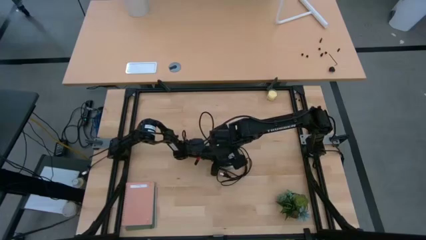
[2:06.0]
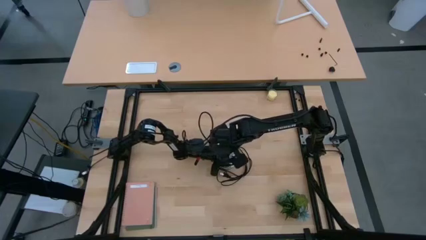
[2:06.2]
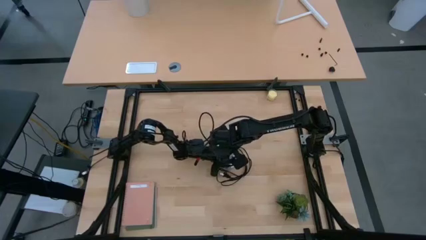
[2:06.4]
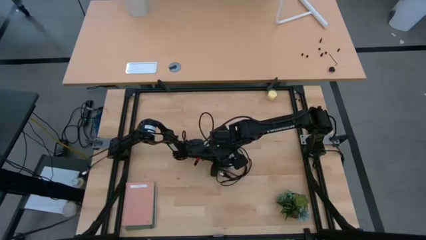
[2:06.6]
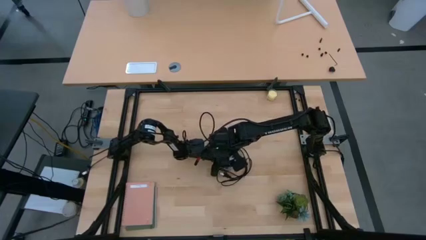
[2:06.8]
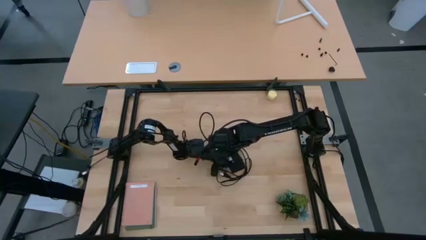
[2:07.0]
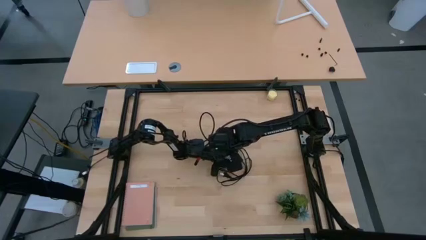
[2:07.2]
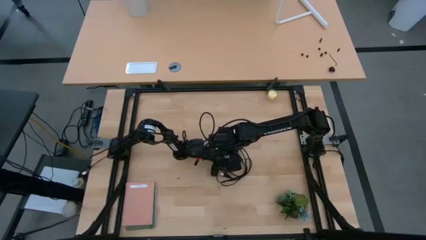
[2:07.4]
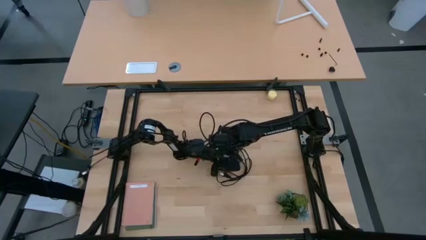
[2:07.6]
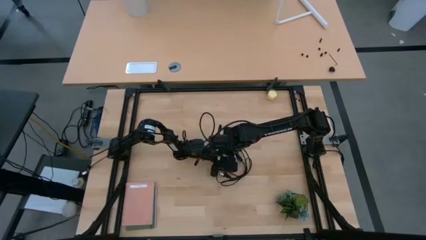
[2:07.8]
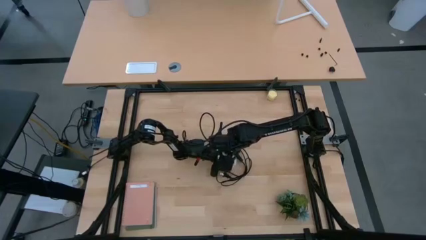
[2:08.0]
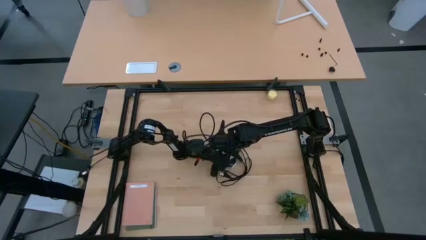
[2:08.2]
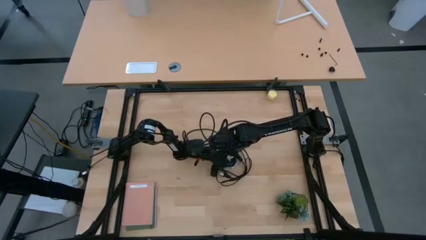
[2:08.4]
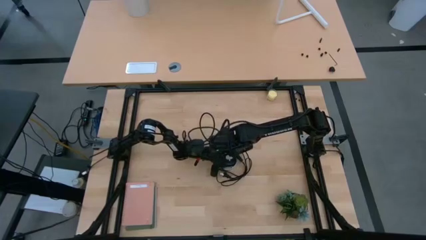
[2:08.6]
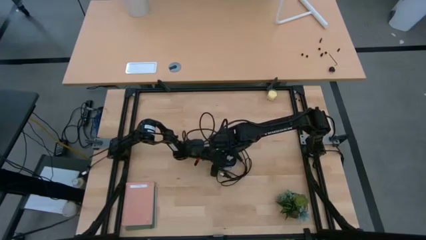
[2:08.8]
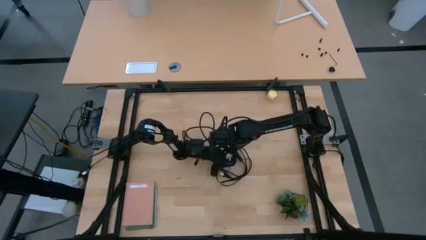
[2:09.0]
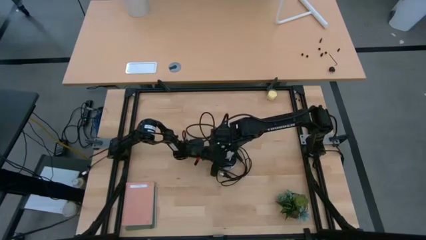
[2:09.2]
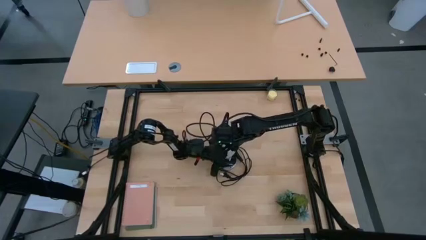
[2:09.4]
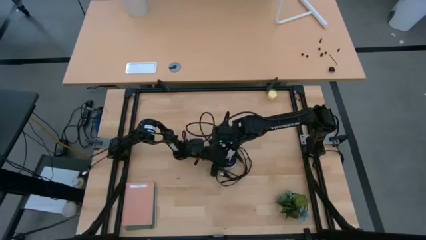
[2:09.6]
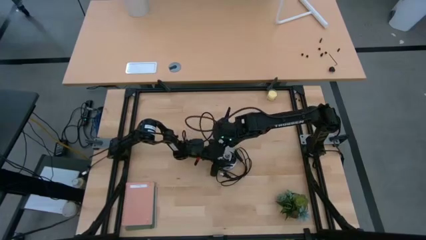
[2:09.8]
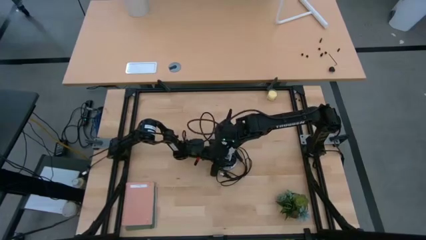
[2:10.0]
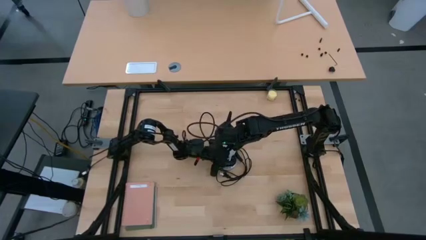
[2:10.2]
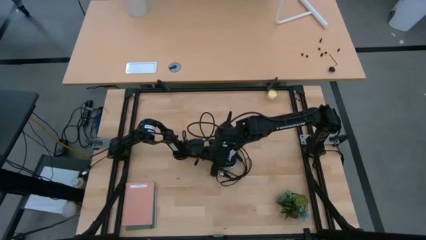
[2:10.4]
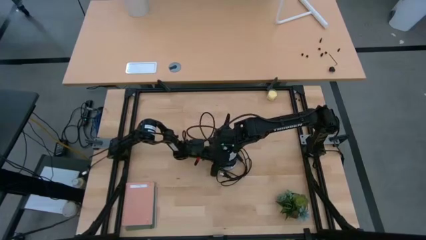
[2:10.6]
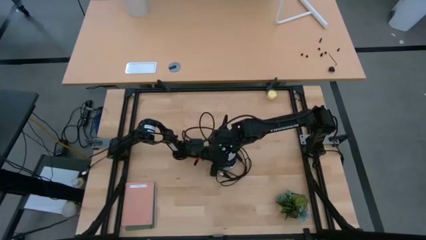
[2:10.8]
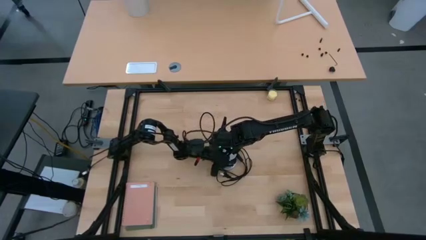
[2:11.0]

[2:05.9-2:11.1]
Task: Screw lightbulb
Insert the white lightbulb into the silver lamp

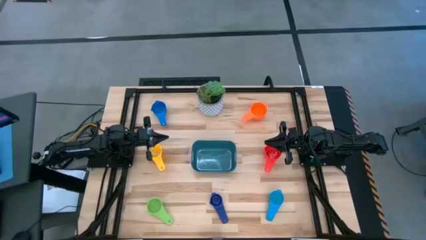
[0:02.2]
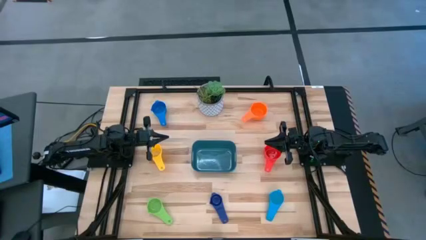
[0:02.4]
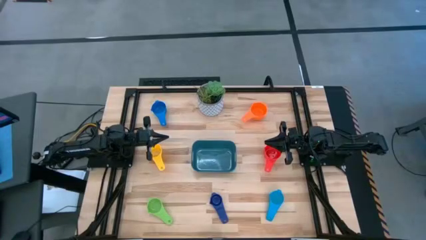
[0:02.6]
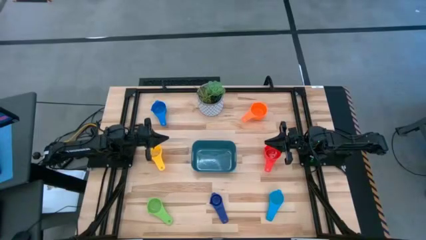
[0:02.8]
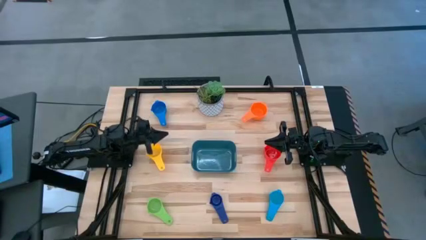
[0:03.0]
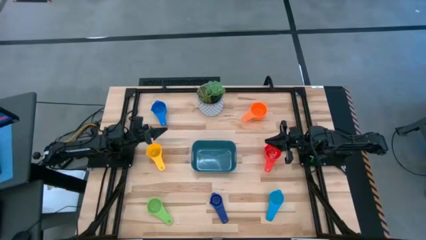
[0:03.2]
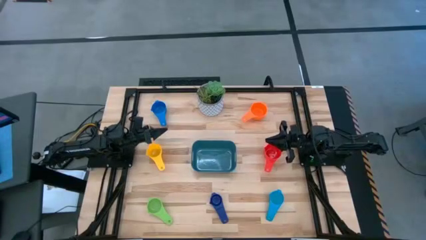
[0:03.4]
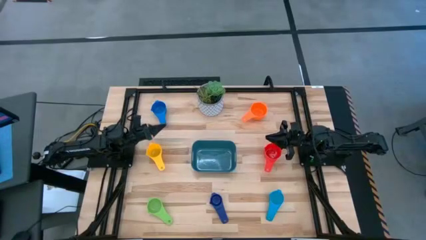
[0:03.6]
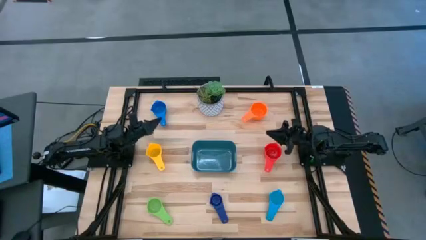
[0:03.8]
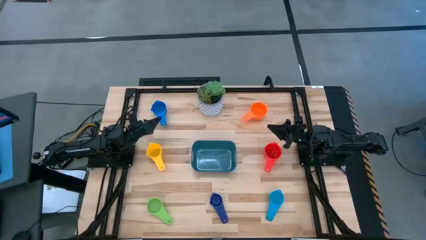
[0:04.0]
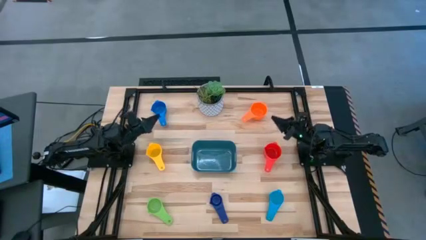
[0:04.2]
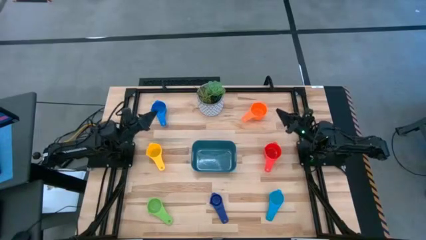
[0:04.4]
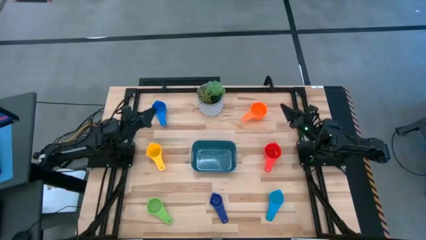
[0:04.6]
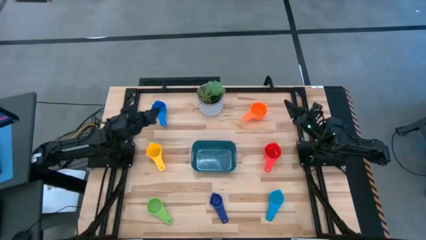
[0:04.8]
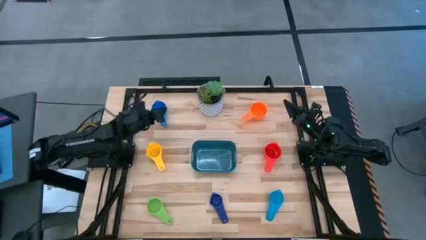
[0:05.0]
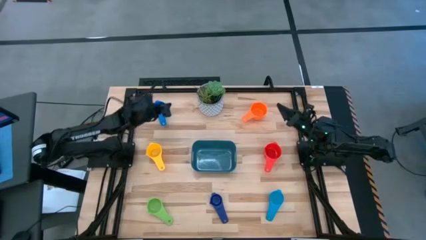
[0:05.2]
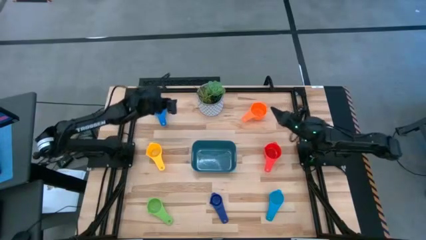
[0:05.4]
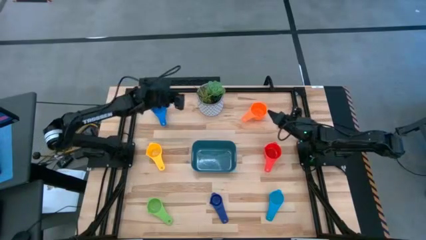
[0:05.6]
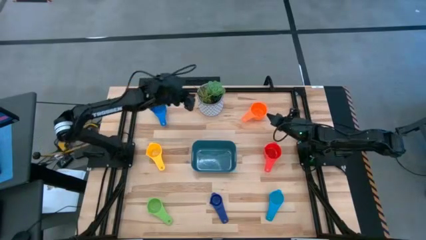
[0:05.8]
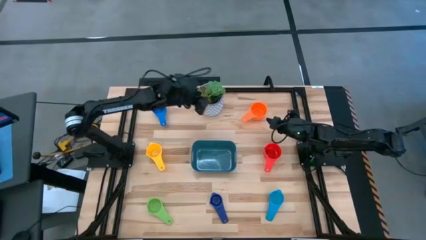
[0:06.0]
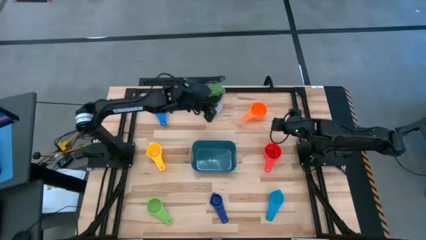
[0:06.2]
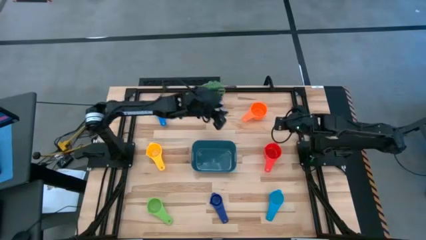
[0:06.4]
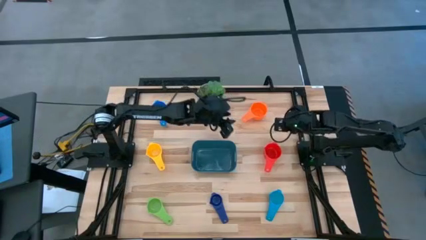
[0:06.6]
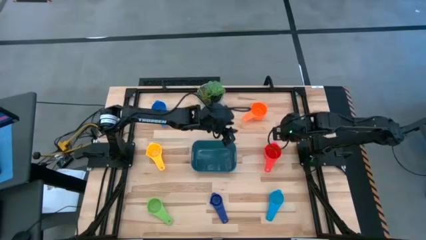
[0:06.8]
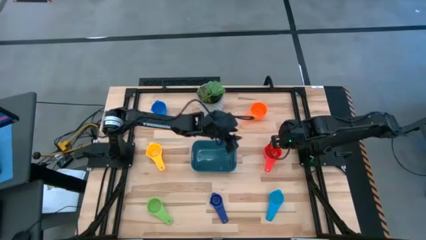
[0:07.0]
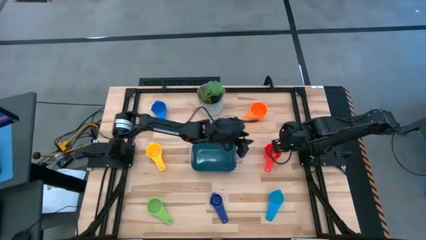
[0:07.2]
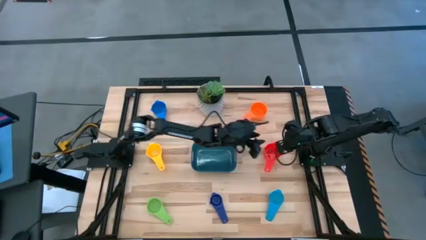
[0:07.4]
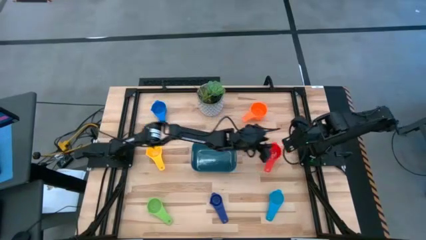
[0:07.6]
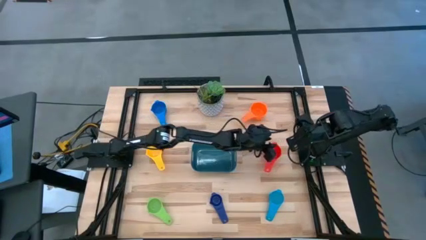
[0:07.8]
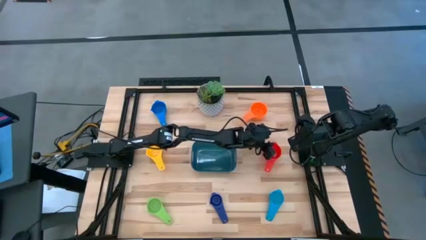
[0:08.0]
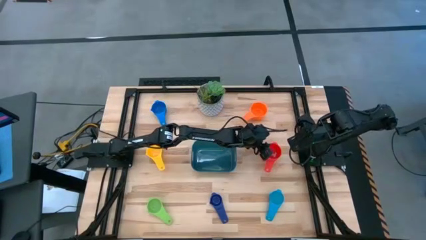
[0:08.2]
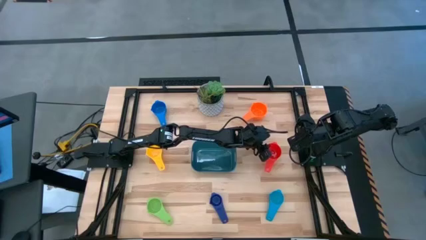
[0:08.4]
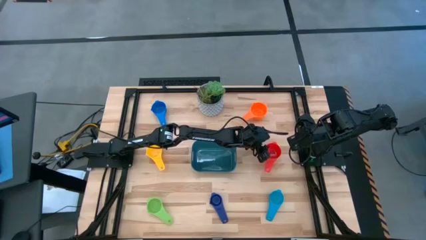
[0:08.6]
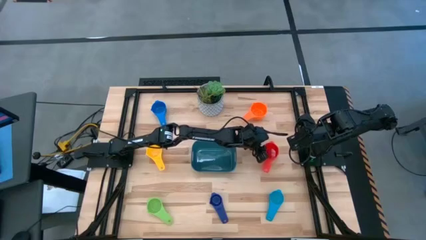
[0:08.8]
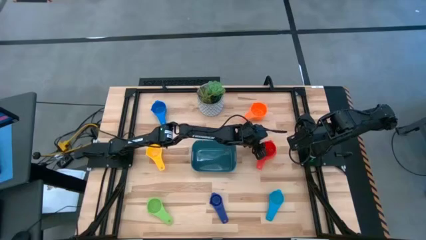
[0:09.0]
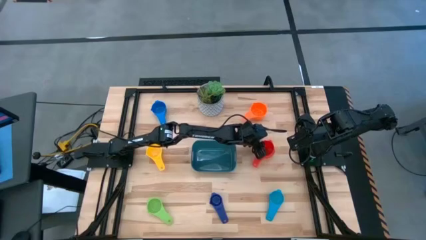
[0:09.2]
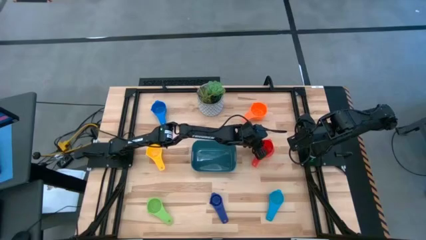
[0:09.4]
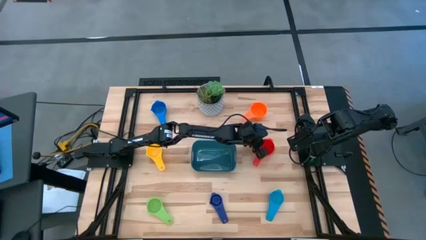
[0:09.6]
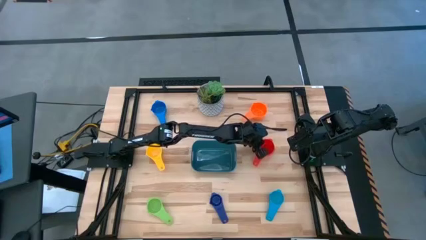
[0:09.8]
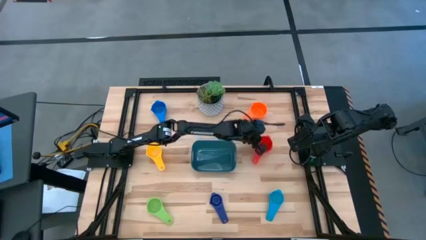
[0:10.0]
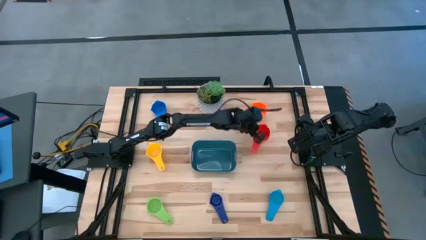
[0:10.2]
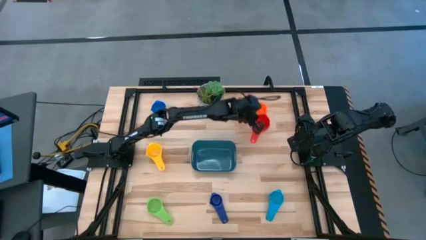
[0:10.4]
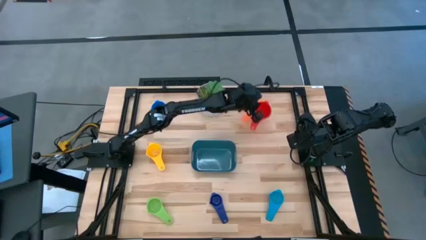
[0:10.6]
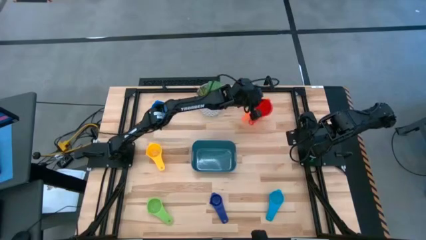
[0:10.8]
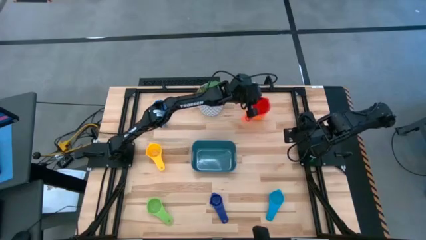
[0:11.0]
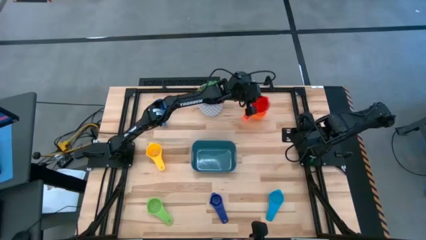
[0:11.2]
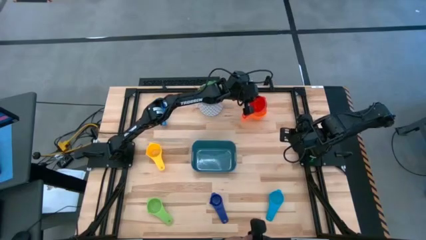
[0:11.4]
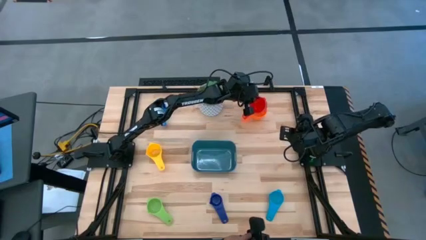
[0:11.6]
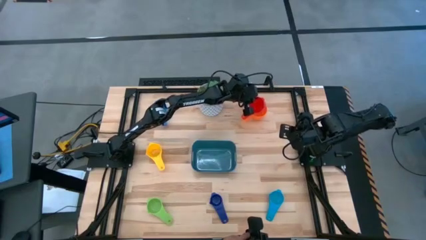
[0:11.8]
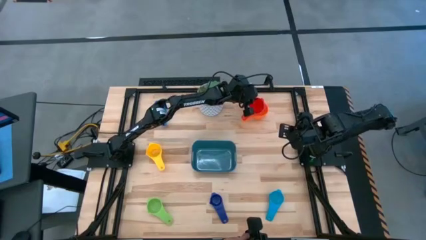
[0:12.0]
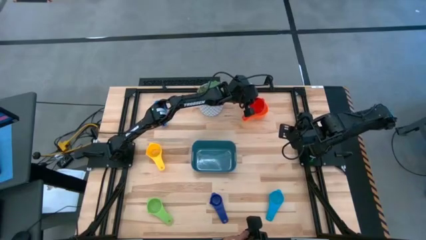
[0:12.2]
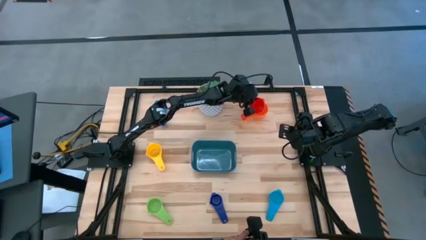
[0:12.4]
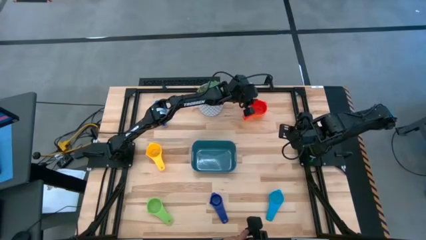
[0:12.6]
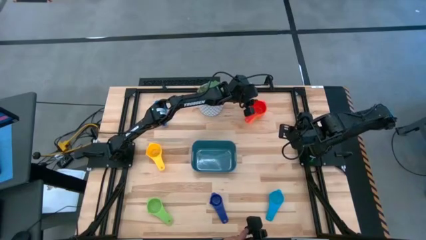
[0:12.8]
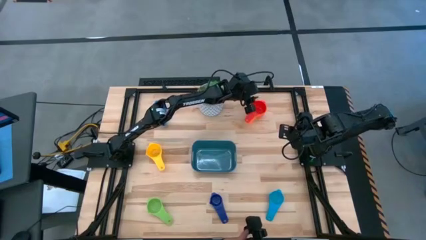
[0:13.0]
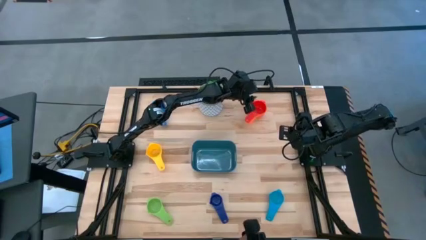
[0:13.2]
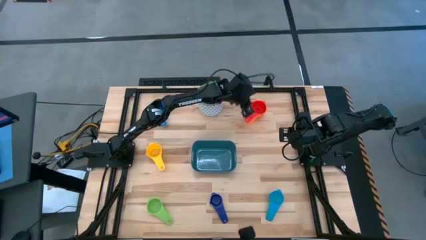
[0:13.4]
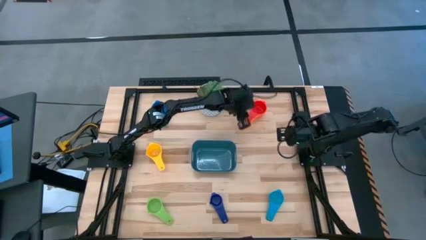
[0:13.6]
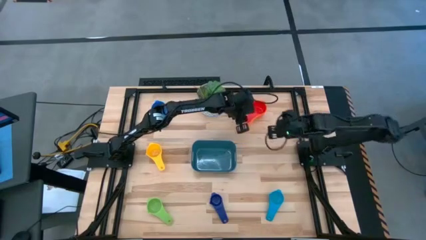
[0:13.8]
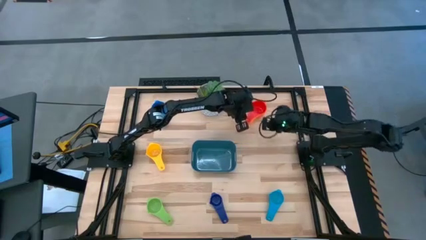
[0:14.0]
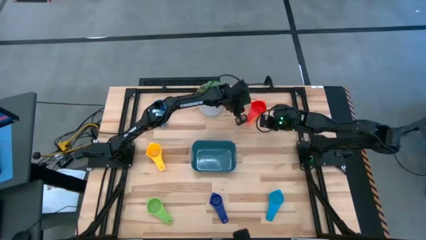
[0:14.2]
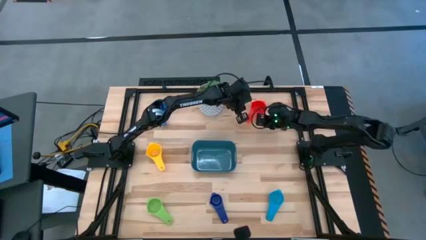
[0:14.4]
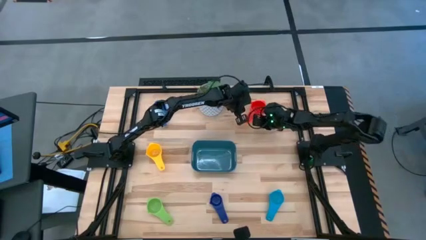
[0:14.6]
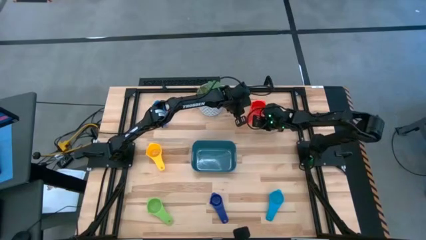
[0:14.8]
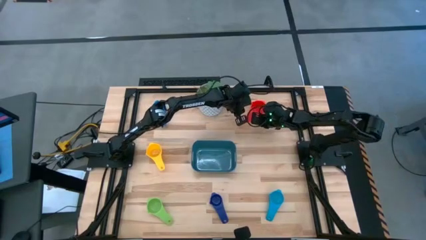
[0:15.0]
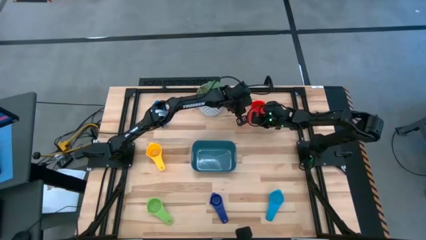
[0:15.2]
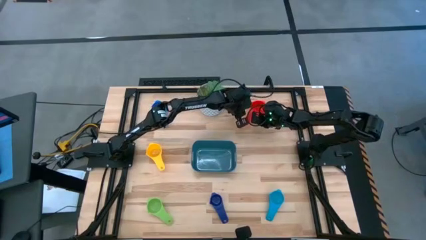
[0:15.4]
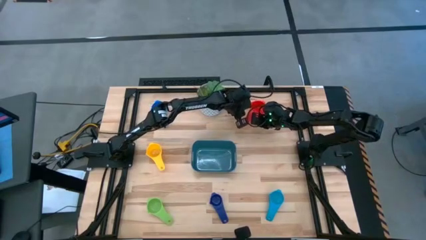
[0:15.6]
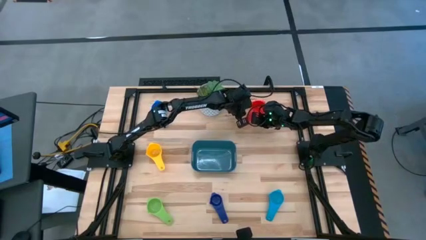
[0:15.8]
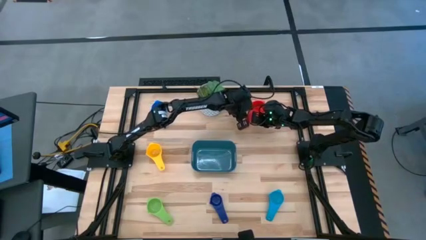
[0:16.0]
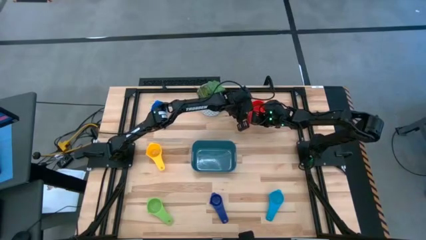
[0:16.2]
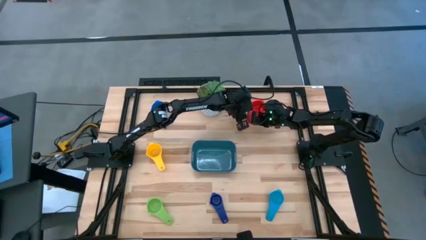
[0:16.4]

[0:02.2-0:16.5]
Task: Nest measuring cups in basket
Stack the red measuring cup on top of the orange measuring cup
